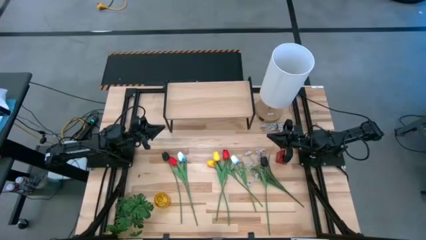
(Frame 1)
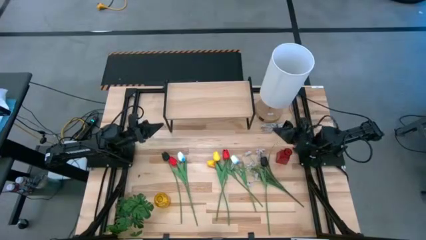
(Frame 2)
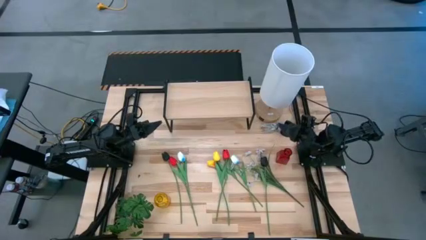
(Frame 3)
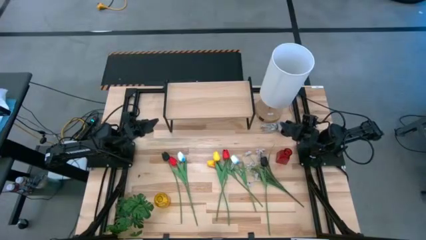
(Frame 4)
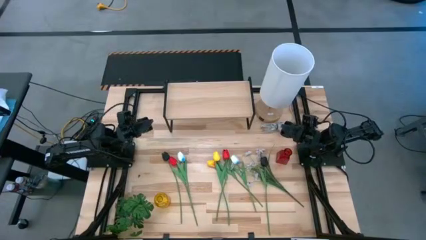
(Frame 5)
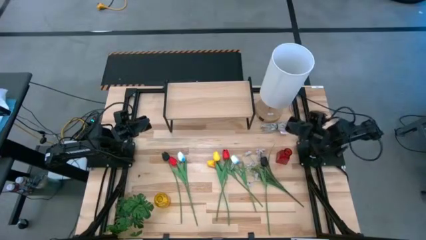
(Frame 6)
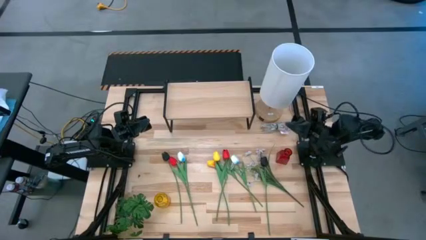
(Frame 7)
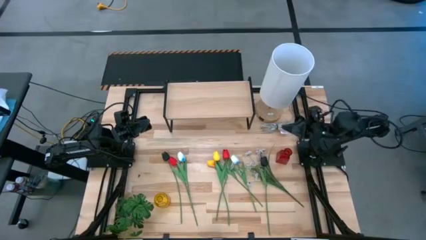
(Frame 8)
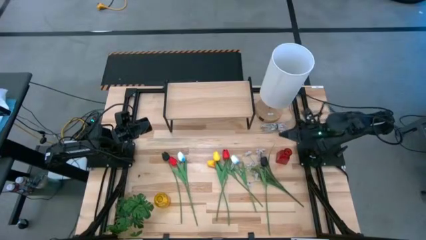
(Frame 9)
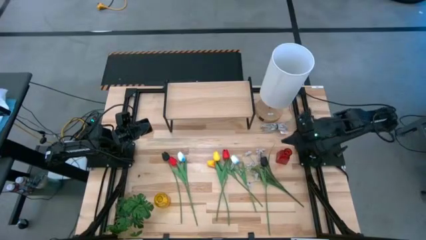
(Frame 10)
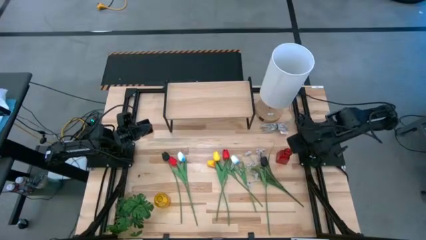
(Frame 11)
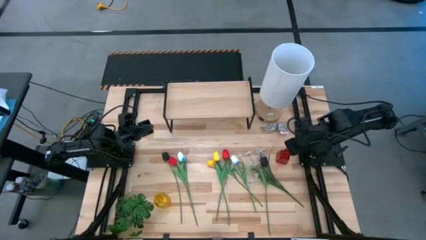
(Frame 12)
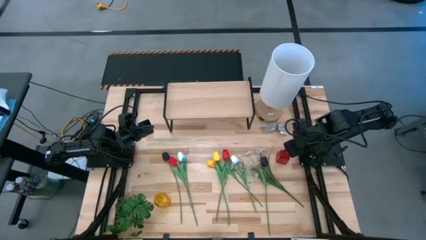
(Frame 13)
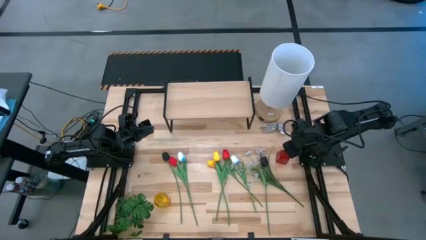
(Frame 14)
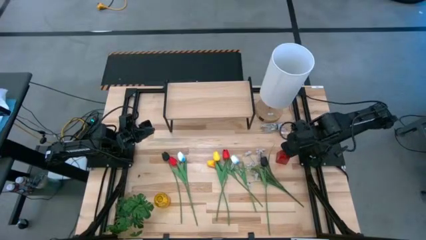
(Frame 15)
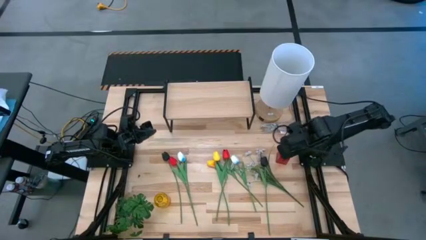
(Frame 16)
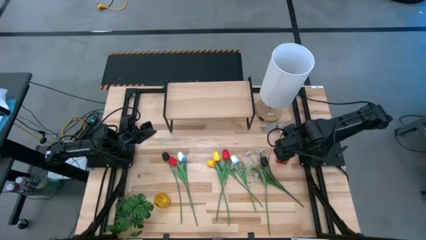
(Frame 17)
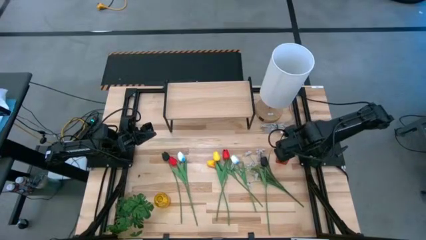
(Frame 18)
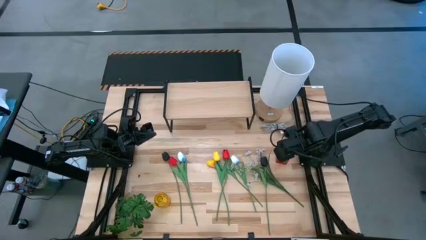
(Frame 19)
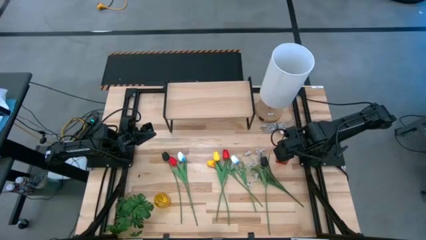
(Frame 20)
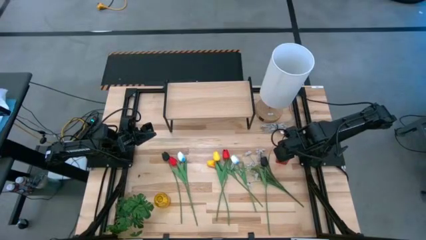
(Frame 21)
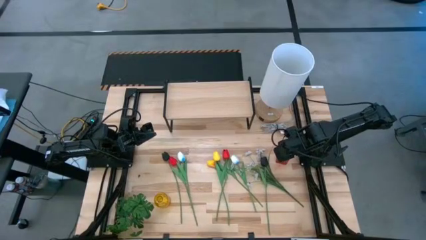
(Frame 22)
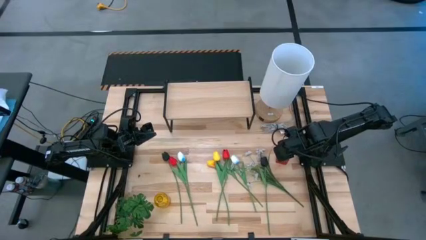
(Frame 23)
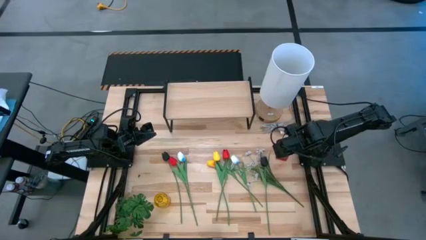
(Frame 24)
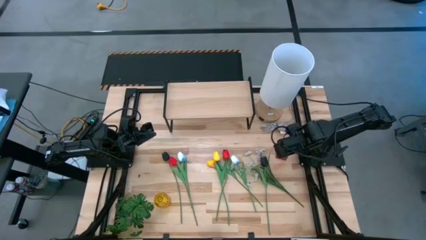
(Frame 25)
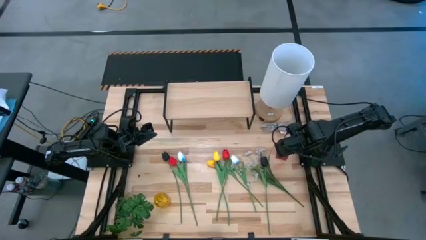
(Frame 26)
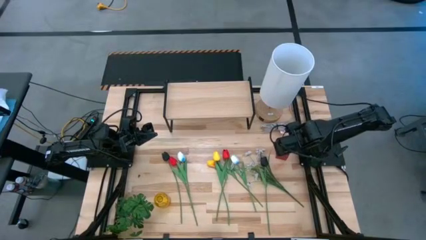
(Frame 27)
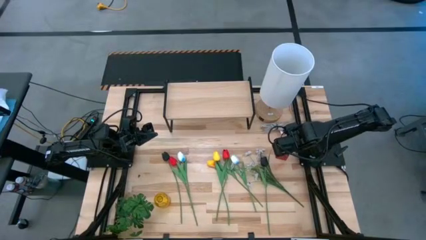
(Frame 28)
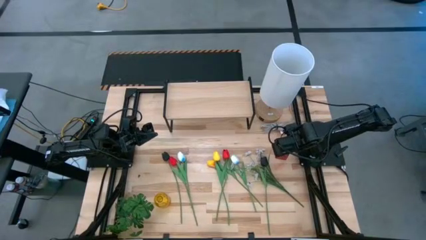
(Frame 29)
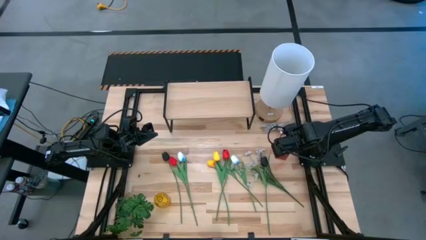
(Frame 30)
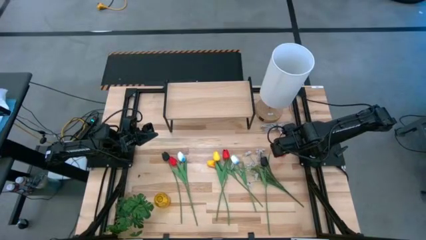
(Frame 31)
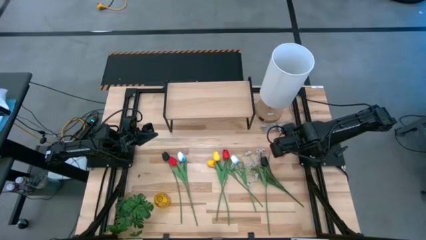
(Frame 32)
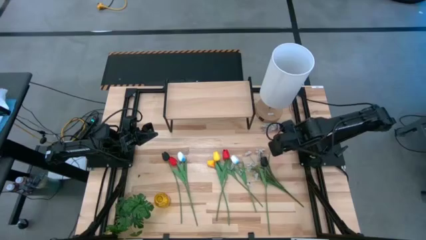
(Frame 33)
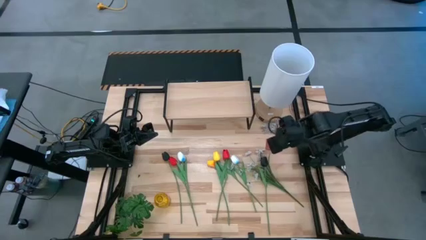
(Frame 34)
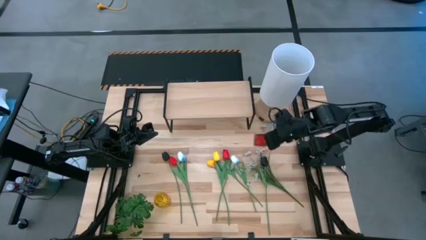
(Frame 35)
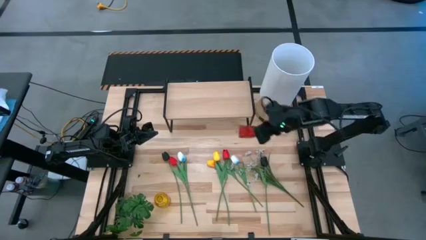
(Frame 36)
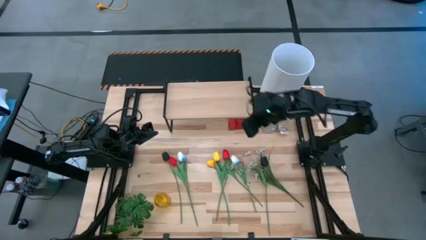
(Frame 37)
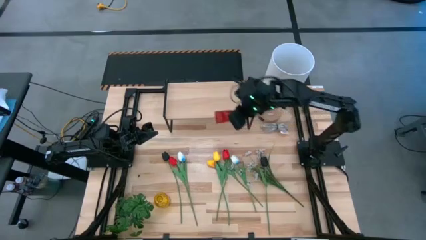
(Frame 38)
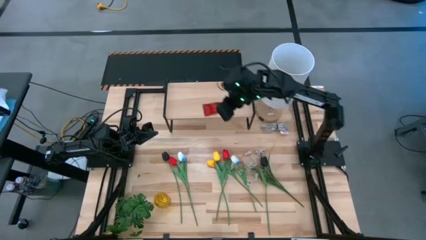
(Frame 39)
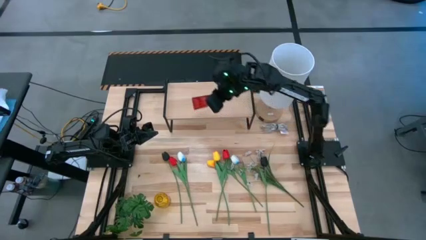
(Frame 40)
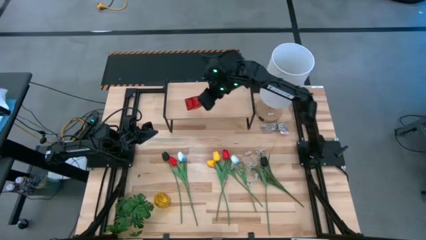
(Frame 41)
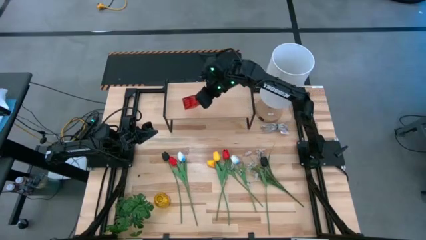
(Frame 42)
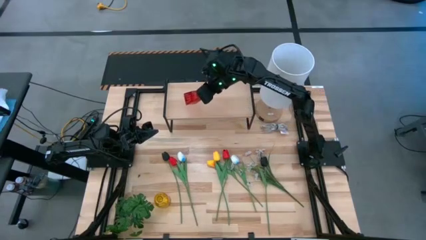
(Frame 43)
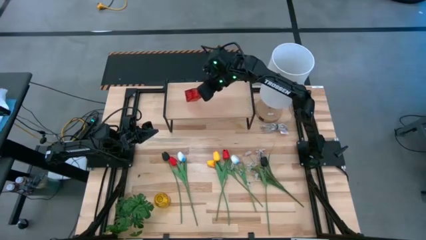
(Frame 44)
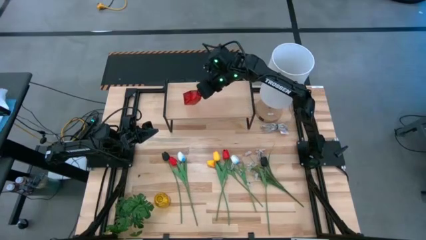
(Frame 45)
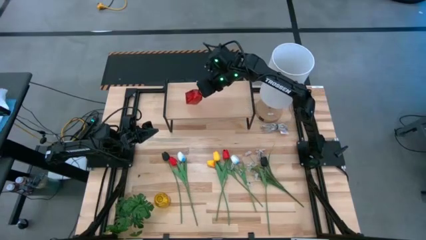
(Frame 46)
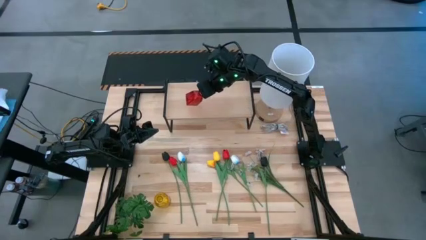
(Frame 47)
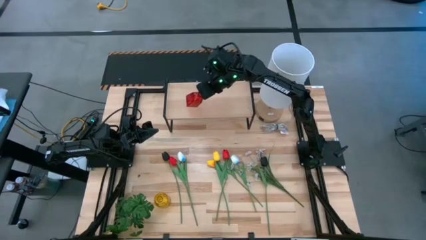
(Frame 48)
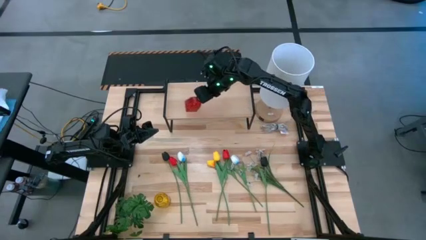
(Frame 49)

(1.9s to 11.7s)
Task: Pick and place flowers into a vace then onto a shelf
Put the red flower vase on the shelf

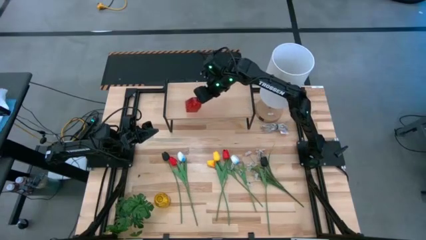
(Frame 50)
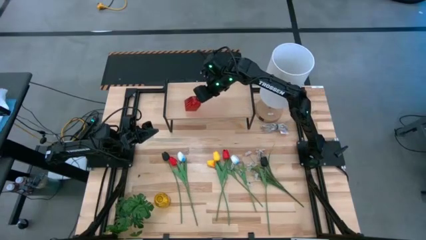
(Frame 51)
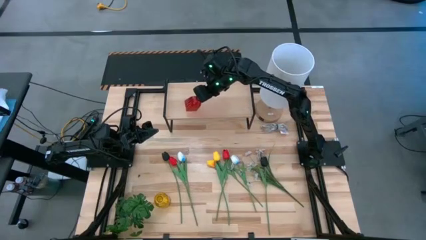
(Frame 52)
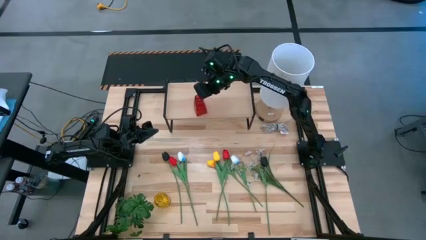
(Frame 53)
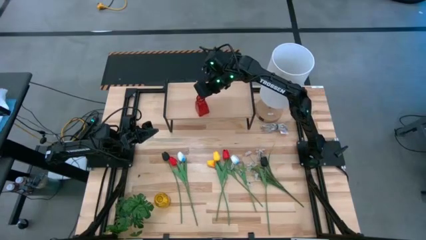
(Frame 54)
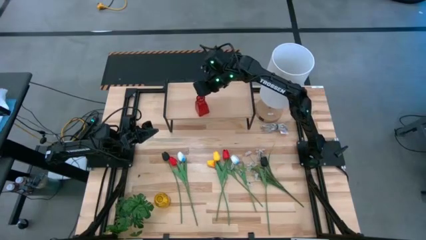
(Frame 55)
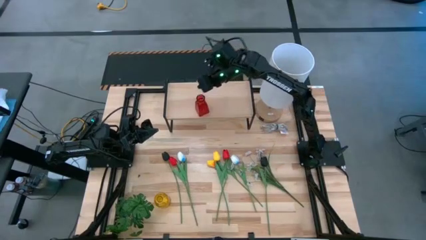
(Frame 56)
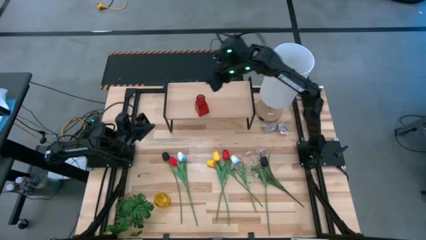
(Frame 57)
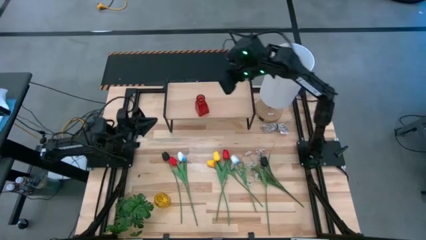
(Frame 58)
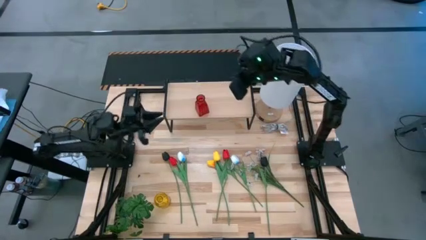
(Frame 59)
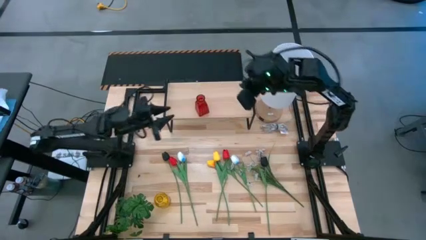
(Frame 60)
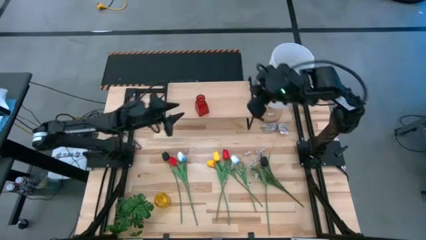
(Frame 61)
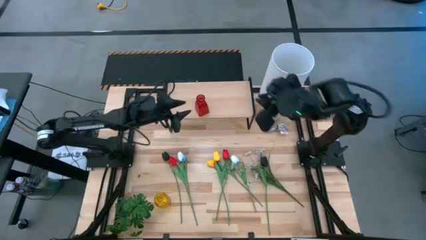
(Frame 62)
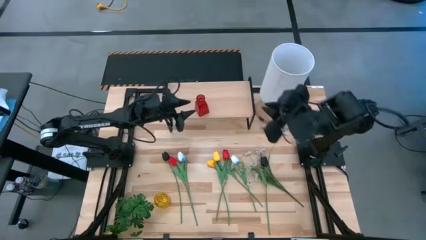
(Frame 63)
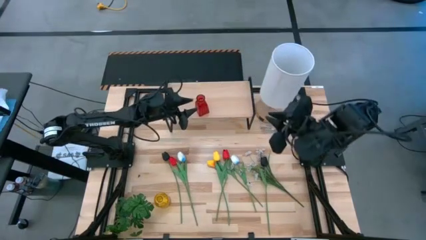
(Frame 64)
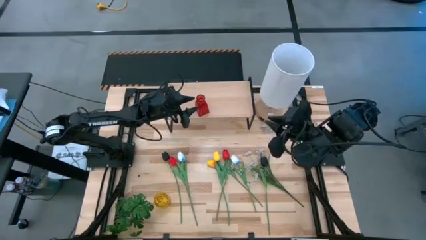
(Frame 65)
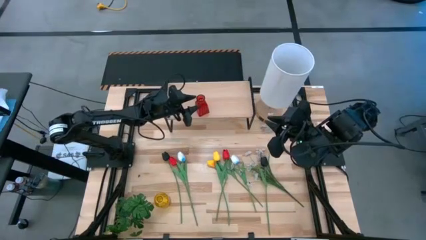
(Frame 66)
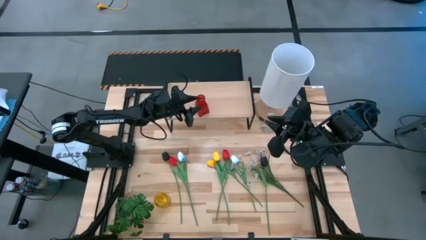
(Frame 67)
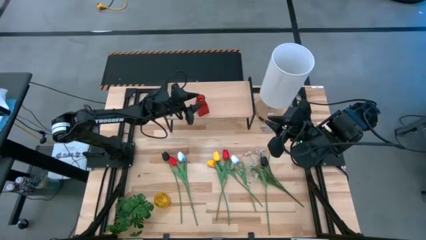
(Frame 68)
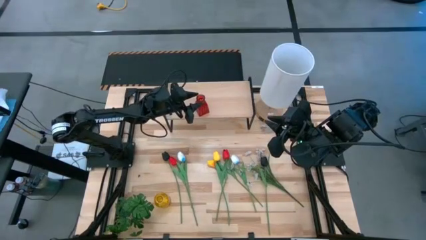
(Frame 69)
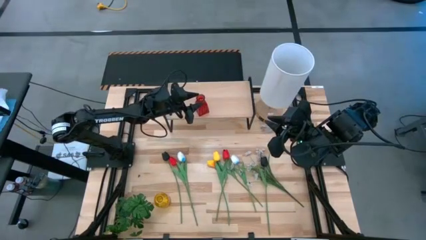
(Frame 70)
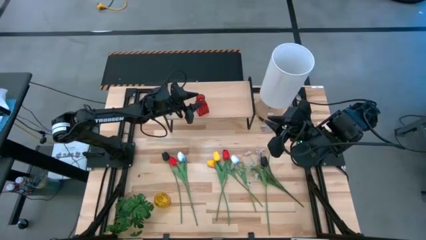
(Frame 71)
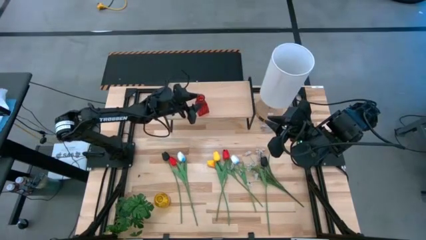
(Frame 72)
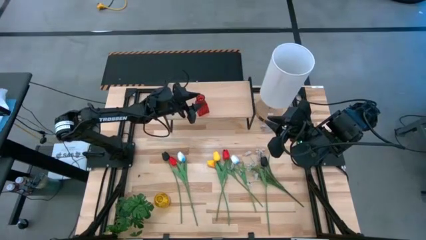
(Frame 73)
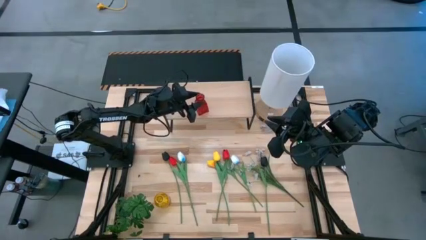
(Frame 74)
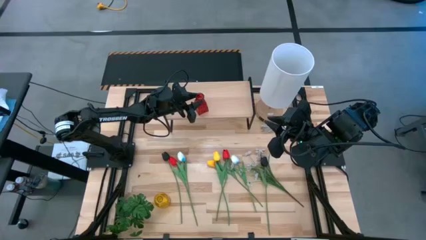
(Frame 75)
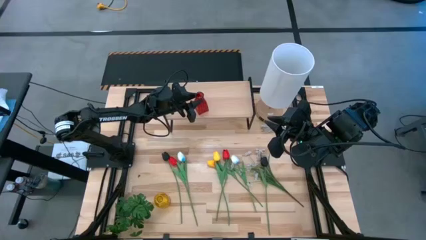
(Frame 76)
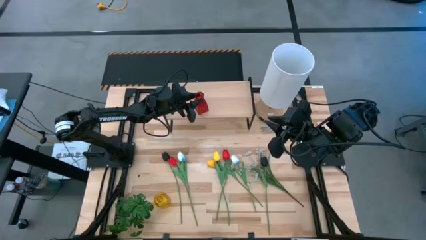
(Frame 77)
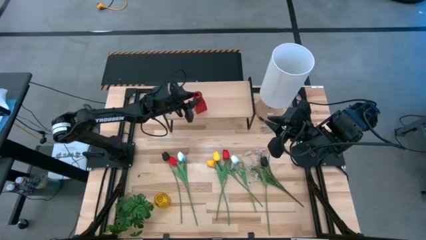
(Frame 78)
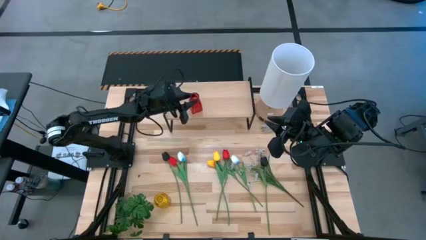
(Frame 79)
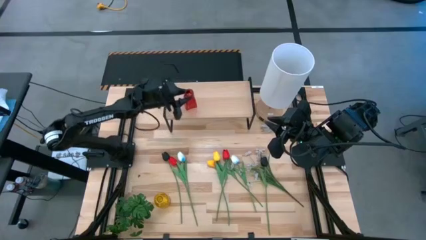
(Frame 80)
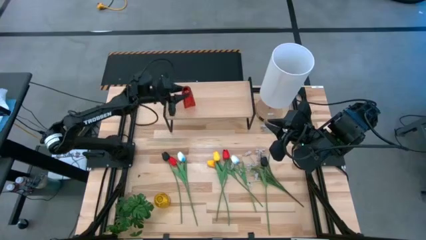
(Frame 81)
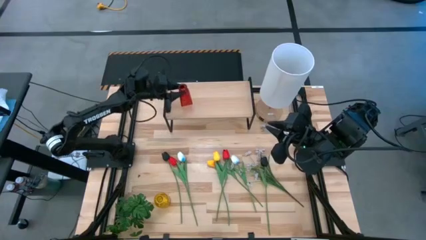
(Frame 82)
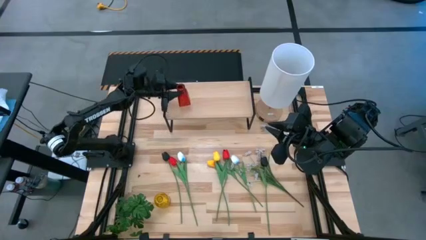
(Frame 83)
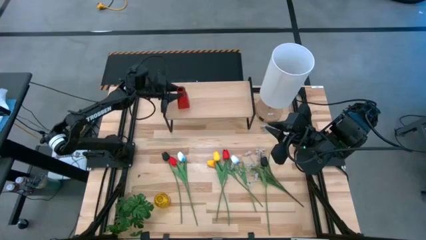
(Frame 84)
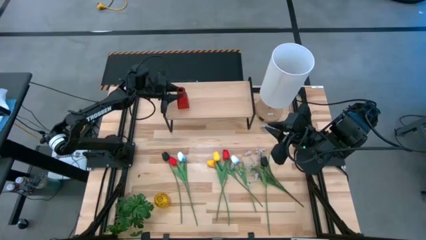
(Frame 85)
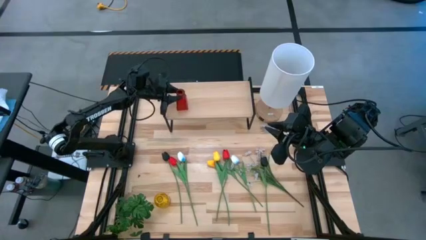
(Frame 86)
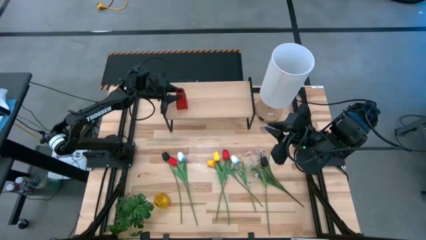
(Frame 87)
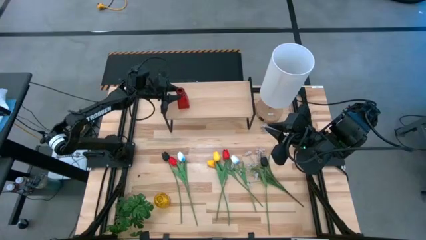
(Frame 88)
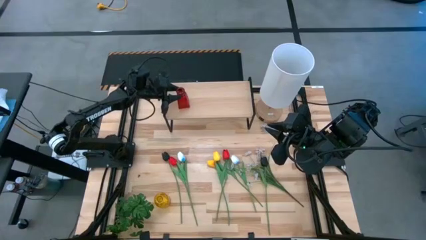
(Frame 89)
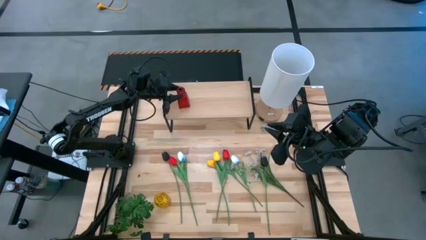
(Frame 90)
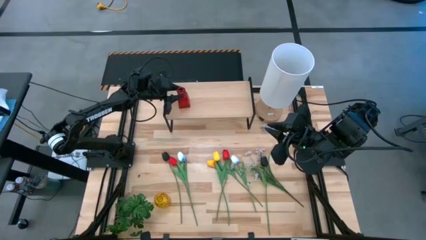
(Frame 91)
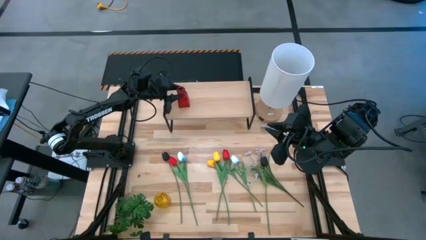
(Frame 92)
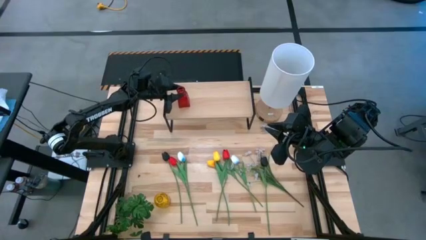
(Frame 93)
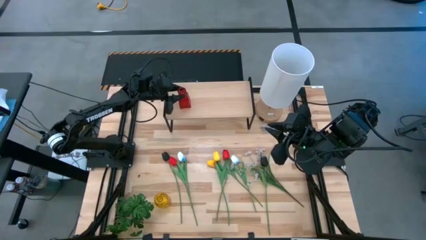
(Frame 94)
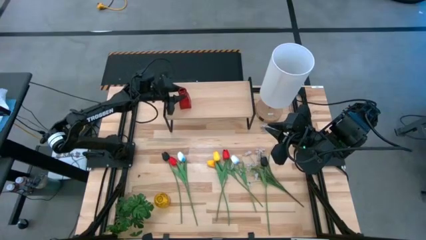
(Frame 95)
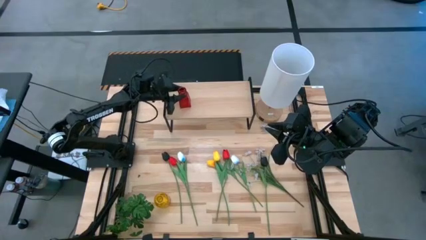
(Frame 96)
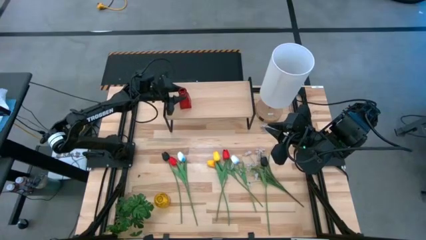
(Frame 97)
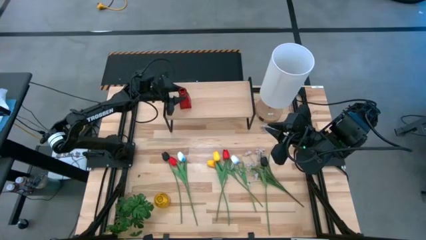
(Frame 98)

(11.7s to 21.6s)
Put the red flower vase on the shelf
